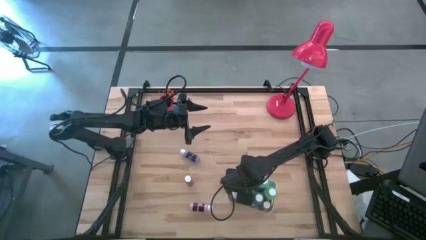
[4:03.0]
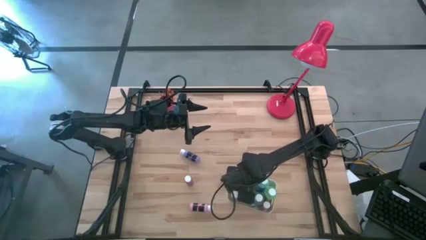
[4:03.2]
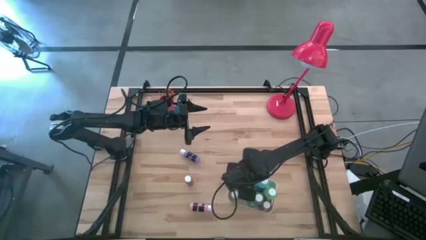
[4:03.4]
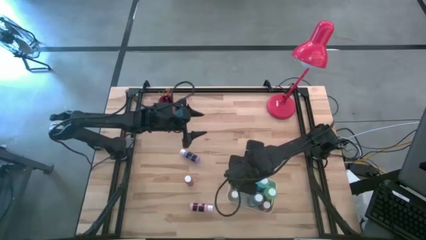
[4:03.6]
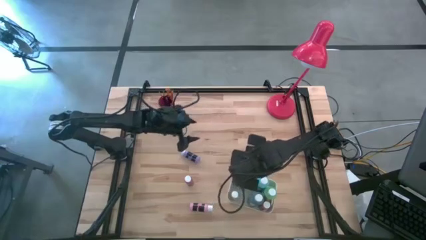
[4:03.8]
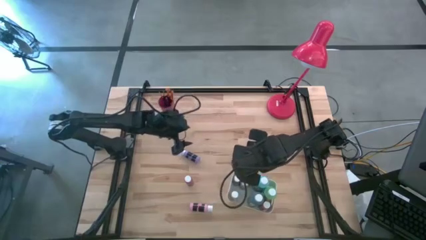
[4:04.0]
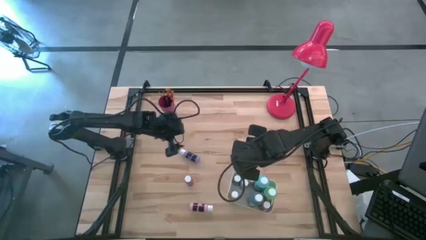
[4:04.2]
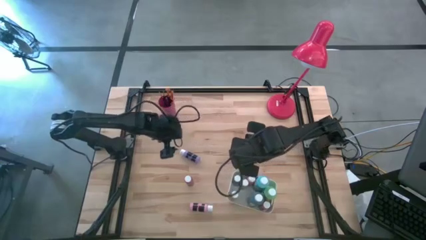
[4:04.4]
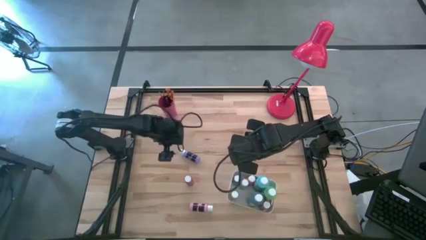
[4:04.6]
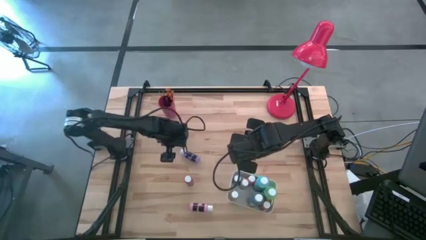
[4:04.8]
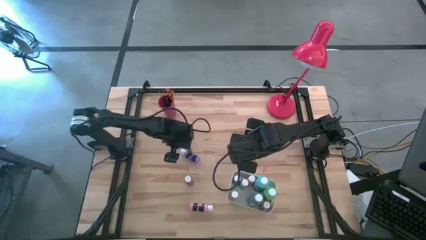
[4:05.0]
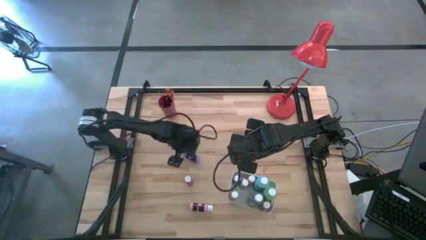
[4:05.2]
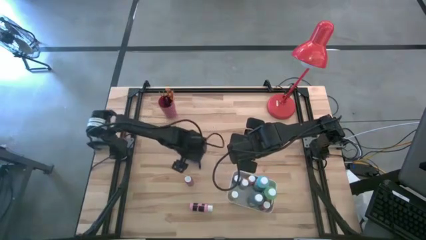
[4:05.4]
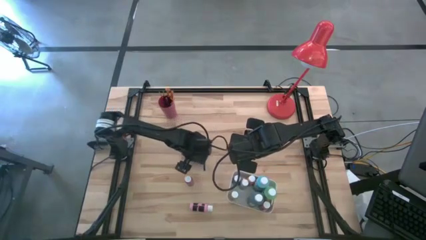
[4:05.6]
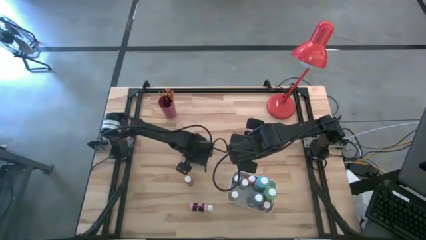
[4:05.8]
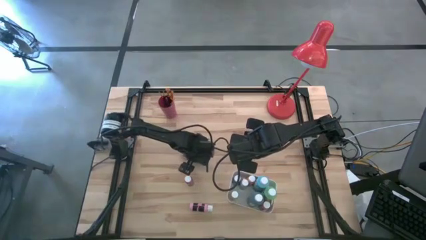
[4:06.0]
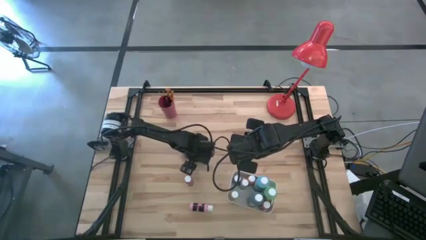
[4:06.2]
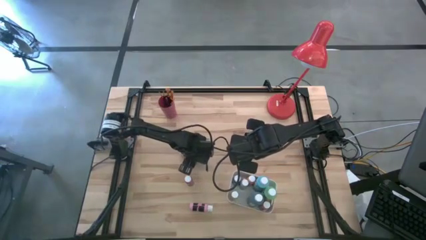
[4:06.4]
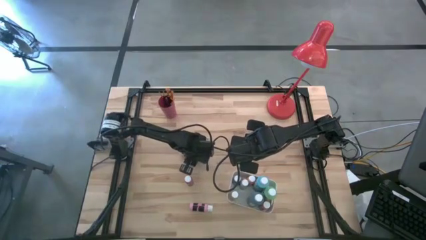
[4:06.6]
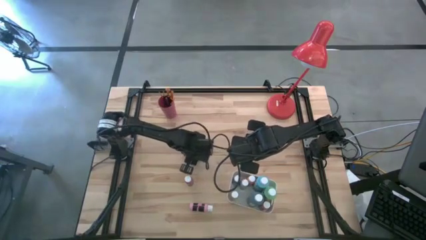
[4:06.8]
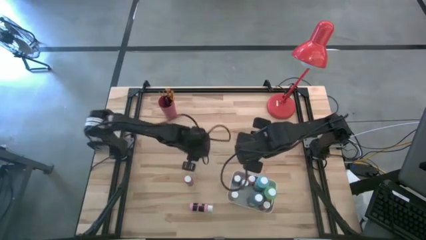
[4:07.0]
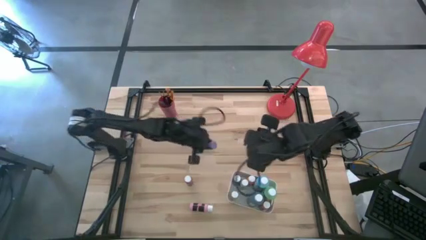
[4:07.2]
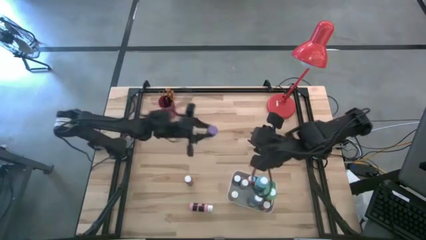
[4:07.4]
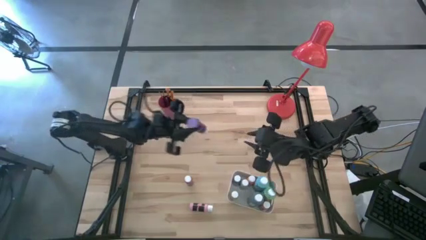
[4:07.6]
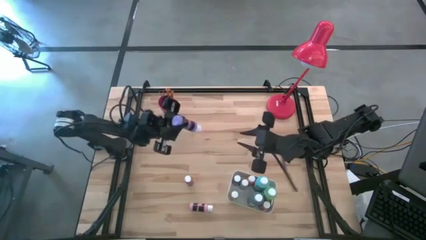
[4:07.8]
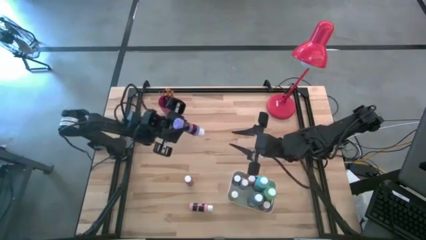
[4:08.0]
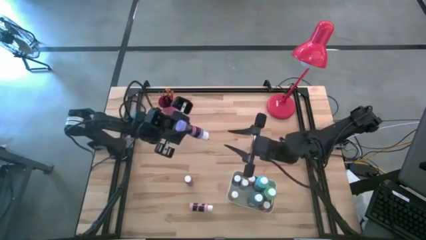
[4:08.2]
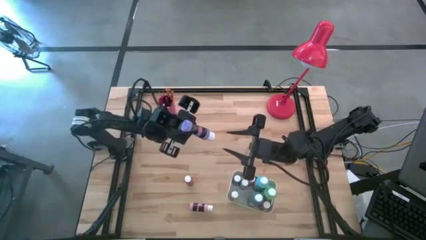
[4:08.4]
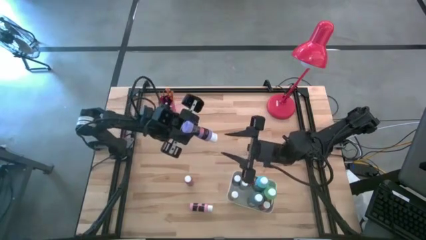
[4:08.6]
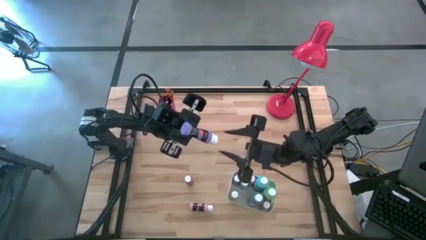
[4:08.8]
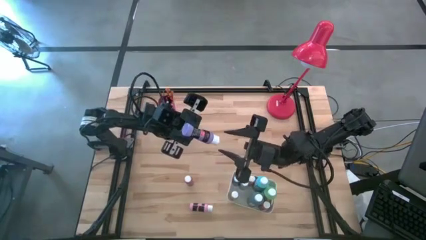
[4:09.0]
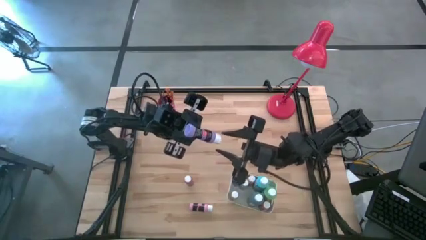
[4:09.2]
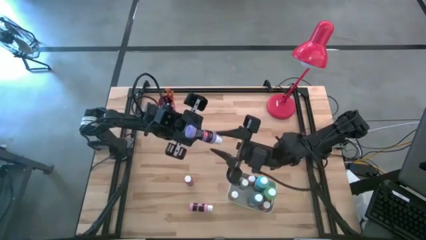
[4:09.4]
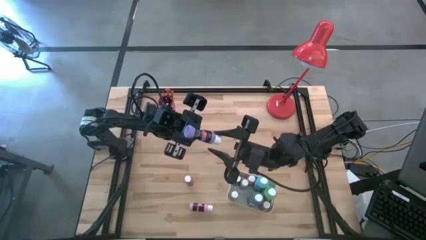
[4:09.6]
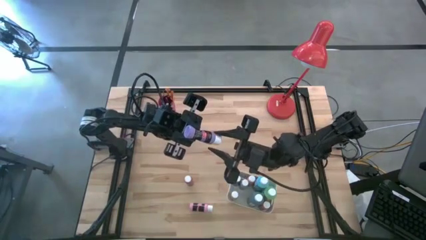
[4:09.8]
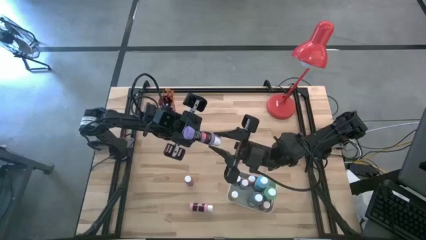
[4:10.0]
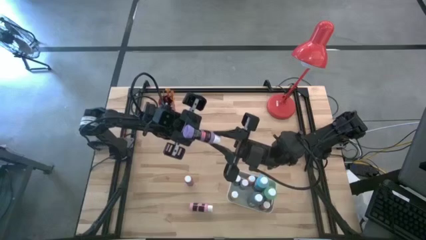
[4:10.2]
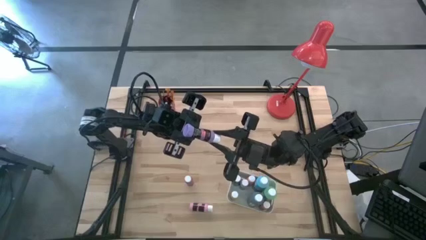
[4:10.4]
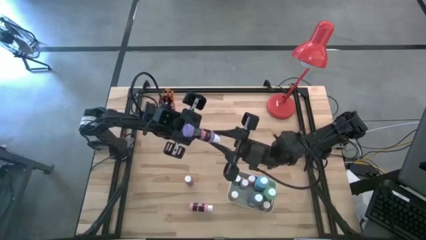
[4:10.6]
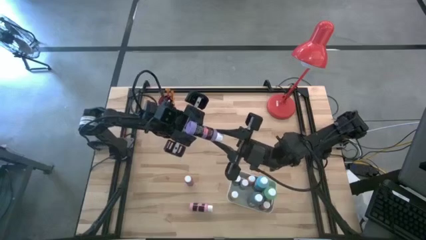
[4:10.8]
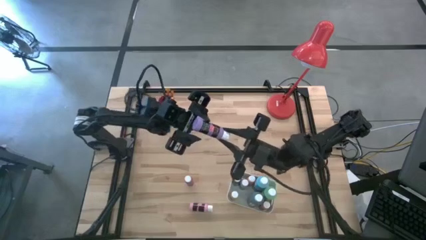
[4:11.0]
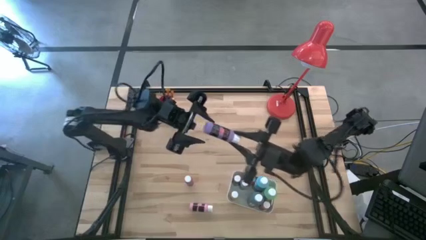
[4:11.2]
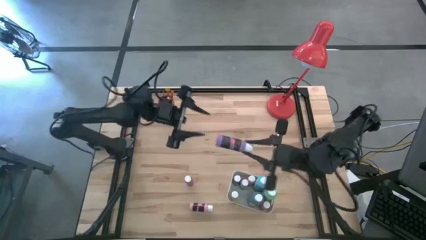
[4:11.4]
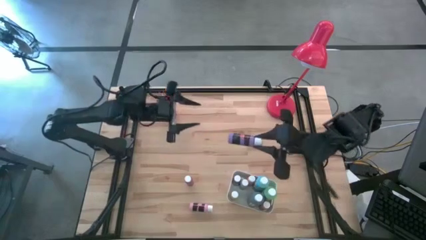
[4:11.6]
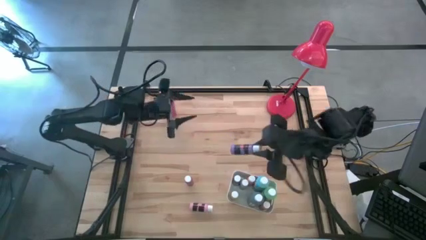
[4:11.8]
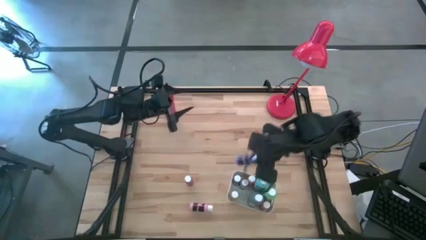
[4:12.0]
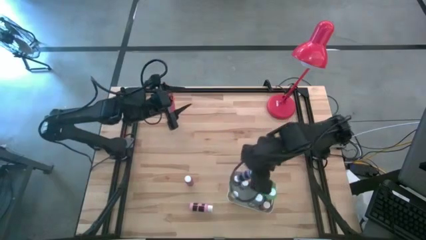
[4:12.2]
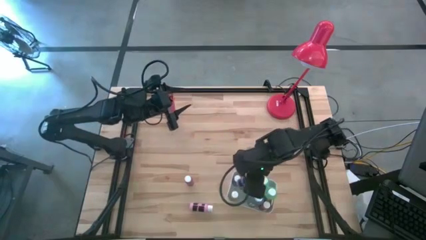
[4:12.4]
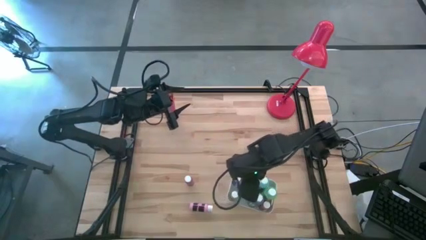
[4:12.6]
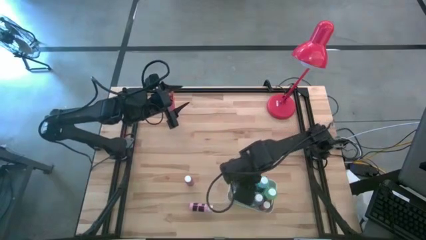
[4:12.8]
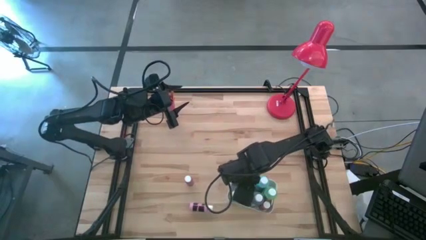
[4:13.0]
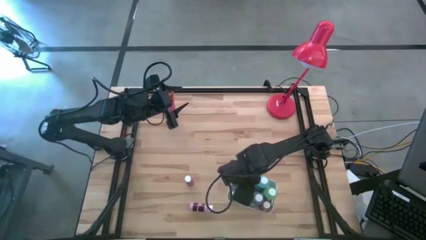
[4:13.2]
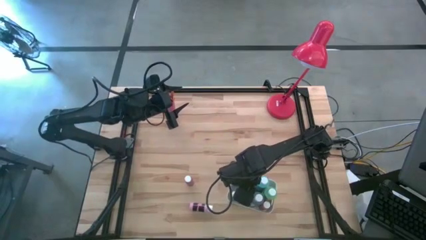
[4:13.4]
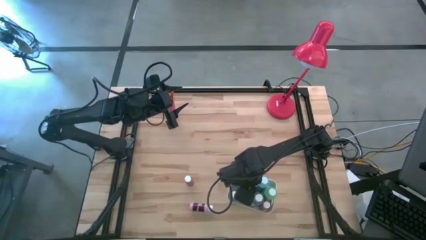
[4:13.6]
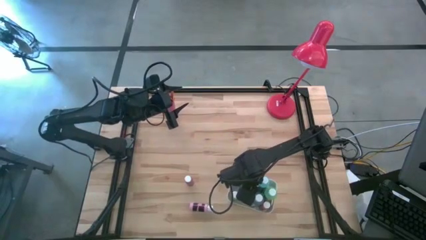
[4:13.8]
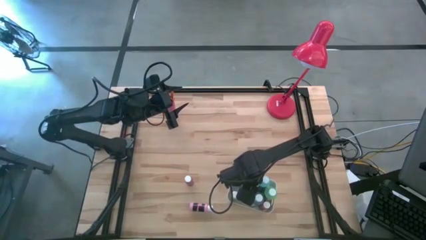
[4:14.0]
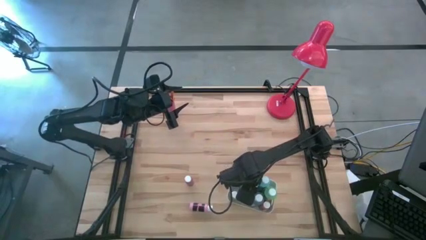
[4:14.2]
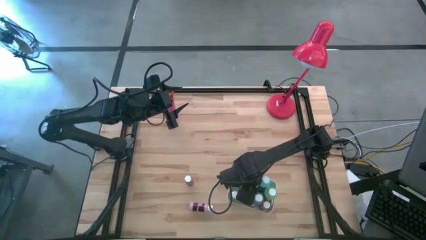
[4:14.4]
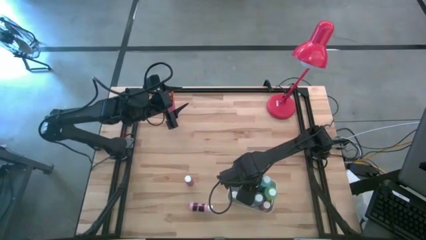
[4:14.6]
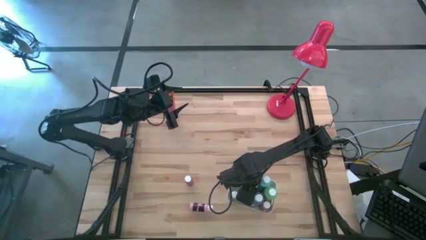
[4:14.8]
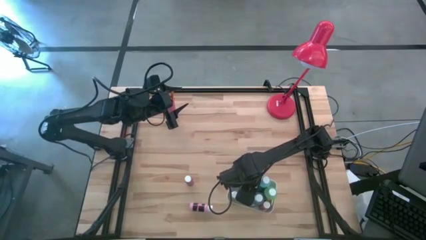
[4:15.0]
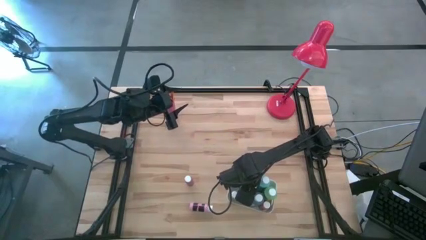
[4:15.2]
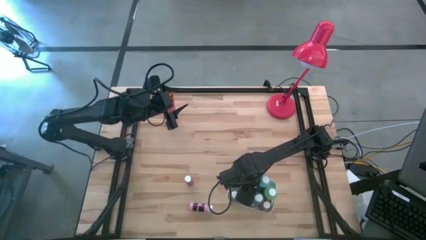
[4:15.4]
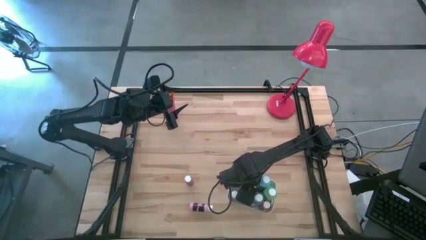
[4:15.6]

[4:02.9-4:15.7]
Task: Pick & Place Paint Supplies
Put the purple paint bottle into the white bin

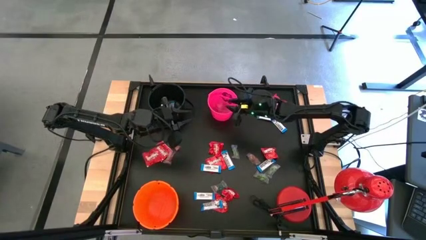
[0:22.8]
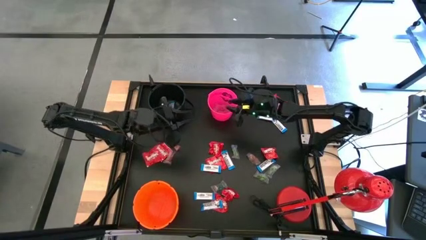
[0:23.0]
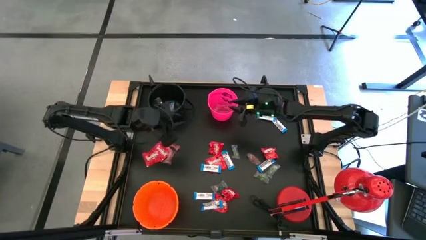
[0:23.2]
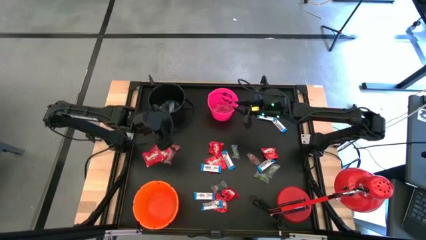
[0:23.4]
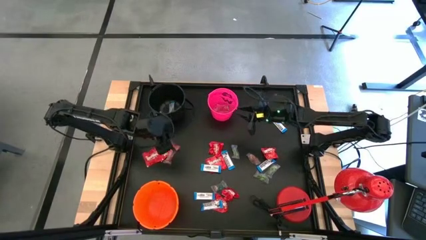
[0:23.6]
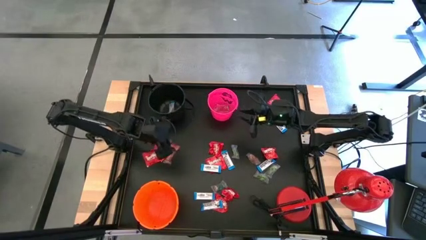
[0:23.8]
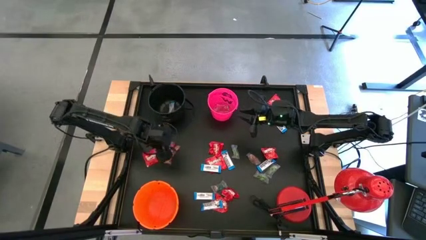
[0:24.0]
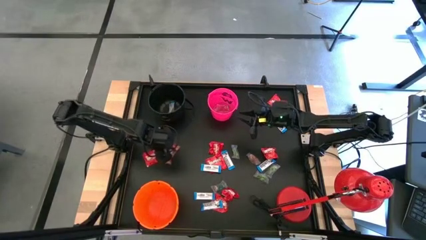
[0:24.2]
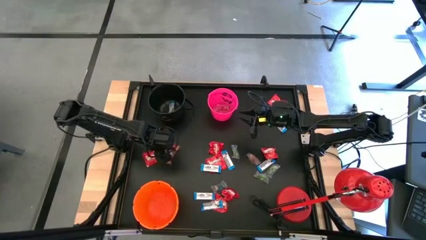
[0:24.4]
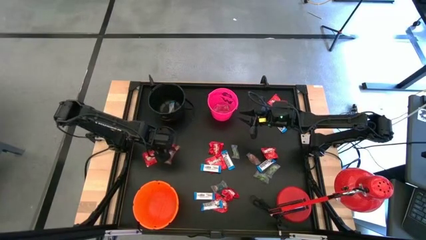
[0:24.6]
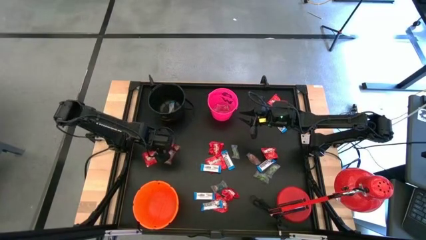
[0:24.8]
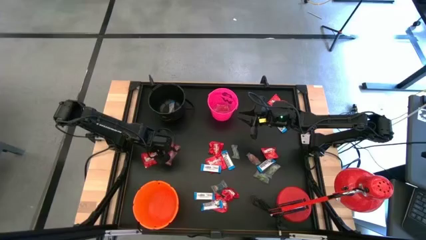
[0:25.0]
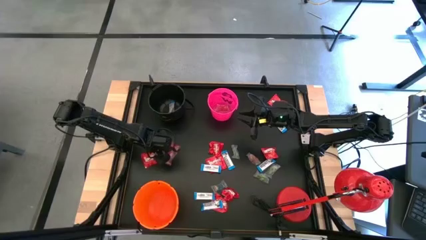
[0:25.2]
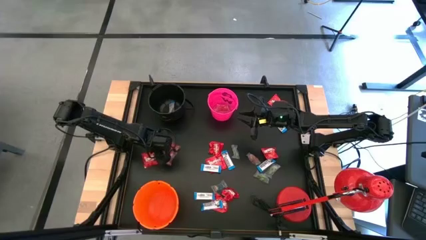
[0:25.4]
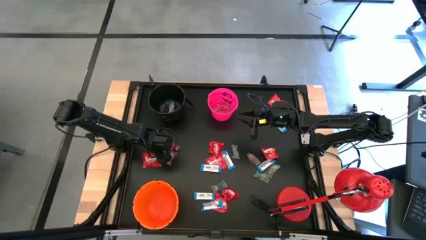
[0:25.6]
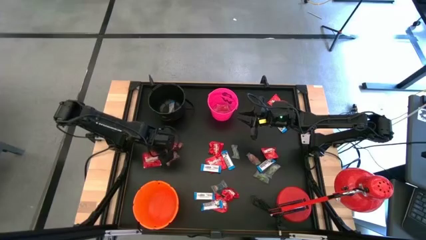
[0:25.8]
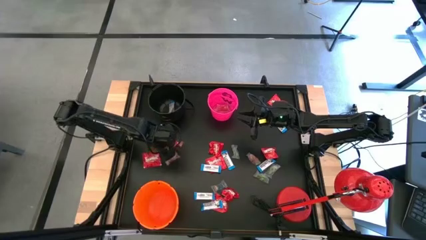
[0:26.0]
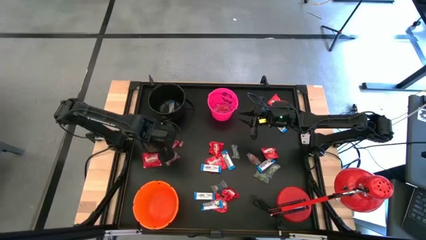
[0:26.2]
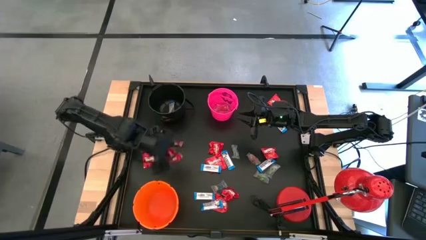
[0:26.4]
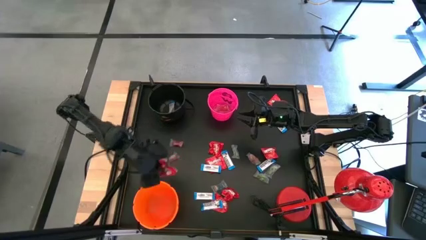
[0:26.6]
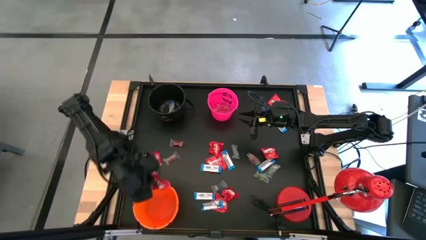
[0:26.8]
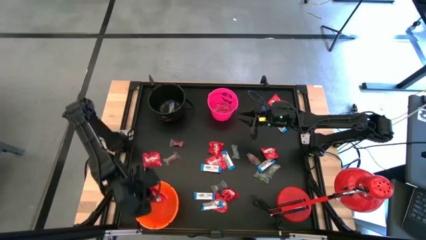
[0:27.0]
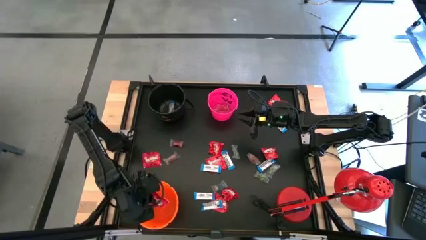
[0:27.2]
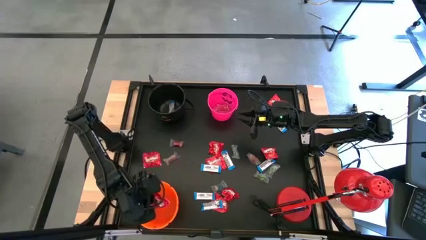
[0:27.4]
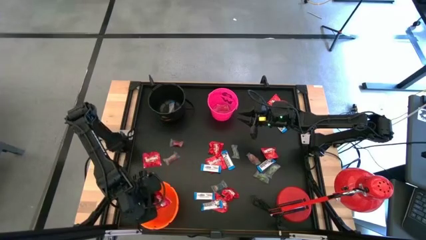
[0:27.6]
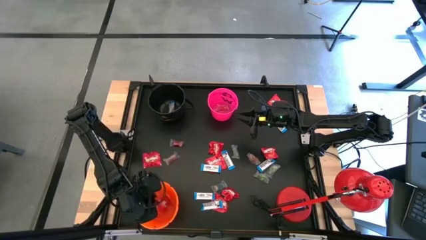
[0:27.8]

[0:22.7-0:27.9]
Task: Organize candy in baskets
Put the red candy into the orange bucket
